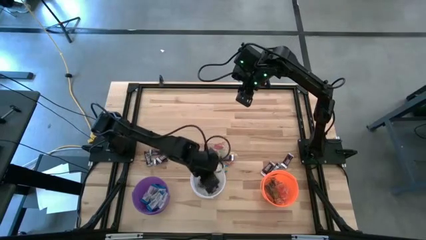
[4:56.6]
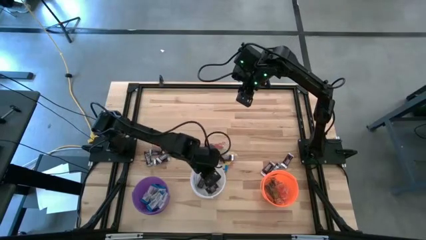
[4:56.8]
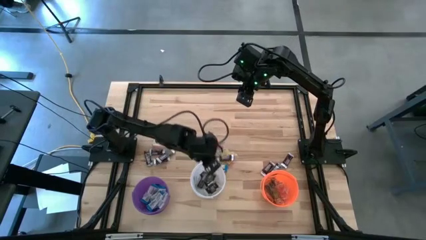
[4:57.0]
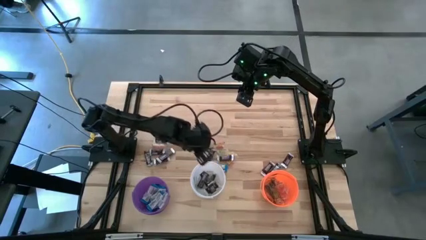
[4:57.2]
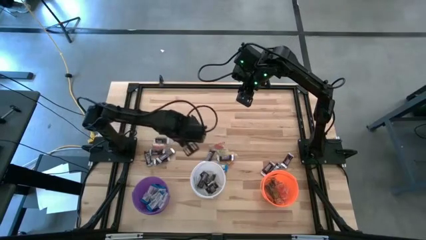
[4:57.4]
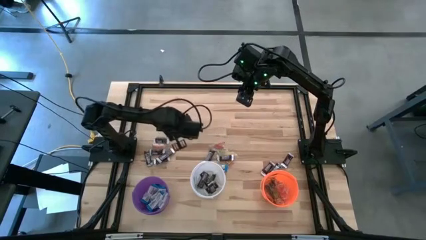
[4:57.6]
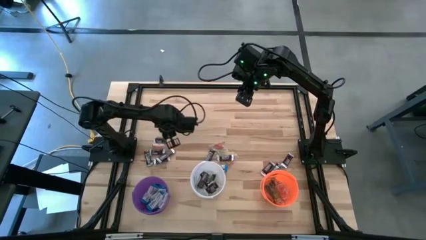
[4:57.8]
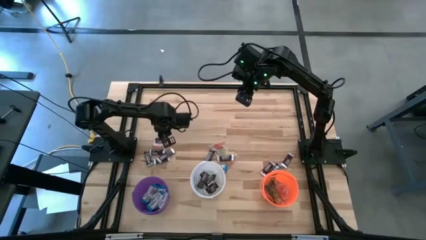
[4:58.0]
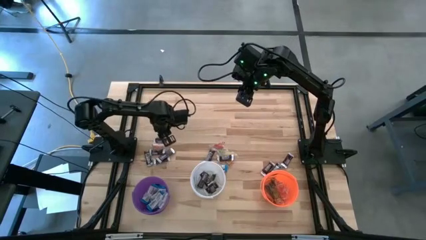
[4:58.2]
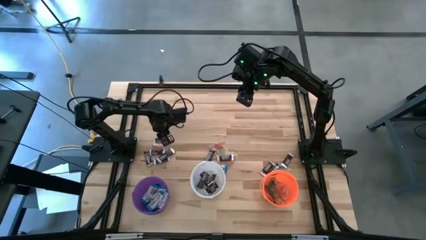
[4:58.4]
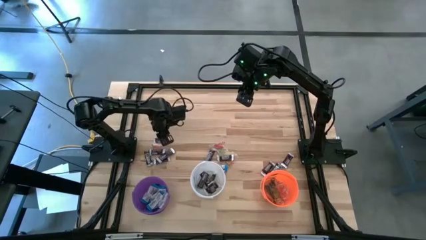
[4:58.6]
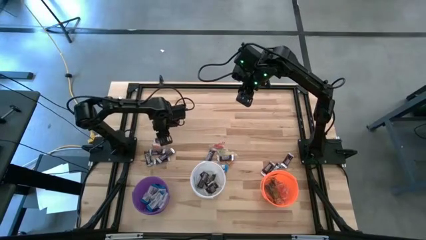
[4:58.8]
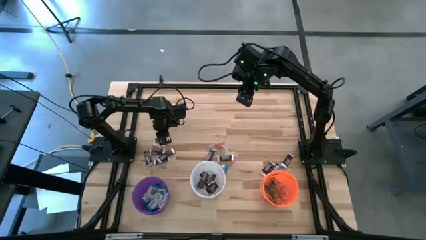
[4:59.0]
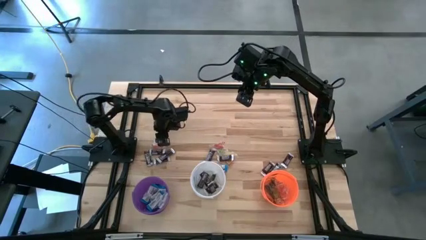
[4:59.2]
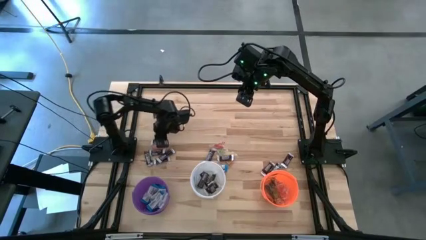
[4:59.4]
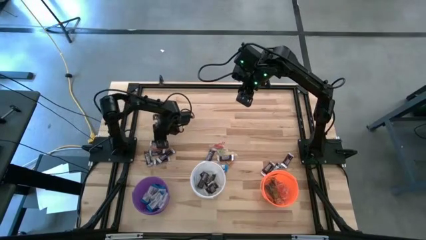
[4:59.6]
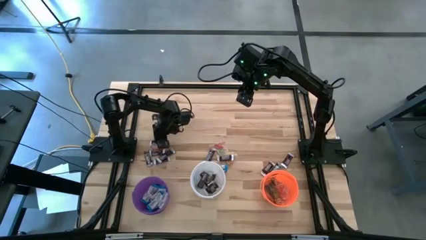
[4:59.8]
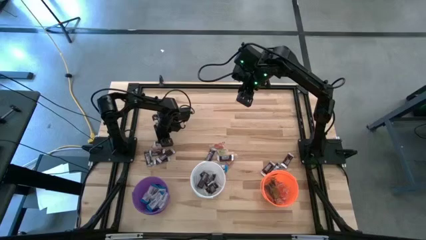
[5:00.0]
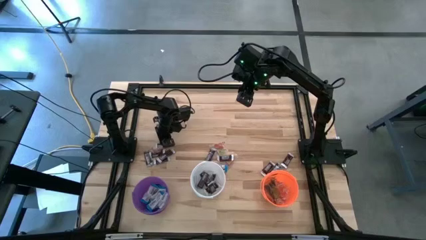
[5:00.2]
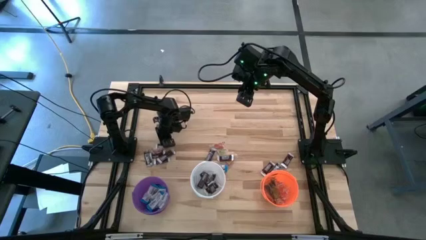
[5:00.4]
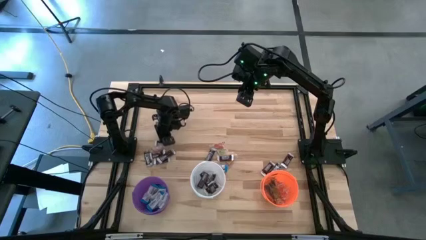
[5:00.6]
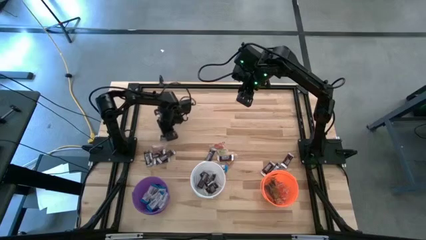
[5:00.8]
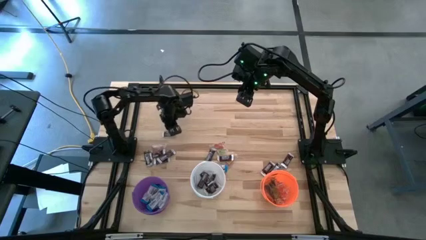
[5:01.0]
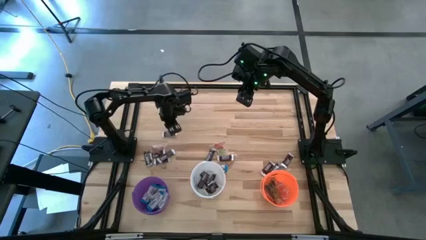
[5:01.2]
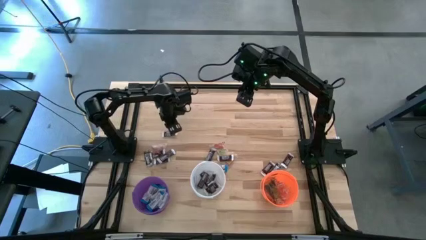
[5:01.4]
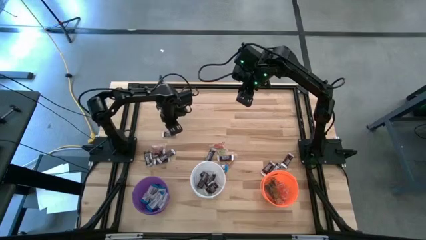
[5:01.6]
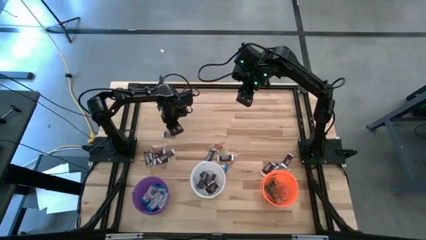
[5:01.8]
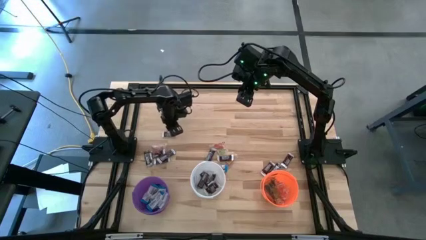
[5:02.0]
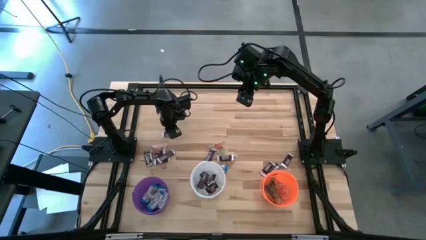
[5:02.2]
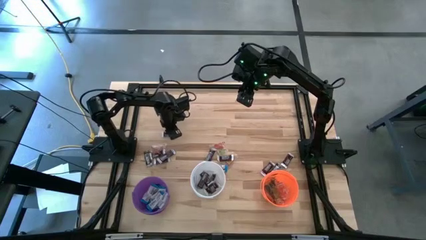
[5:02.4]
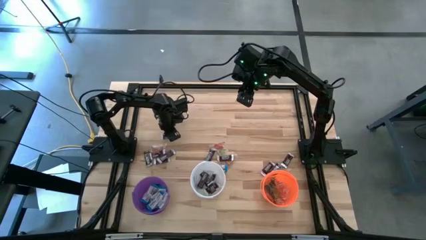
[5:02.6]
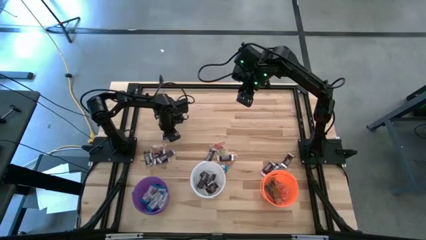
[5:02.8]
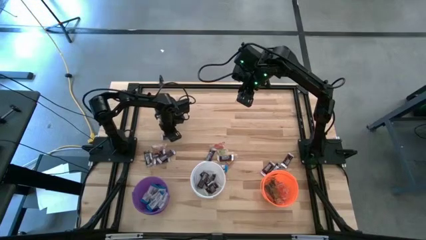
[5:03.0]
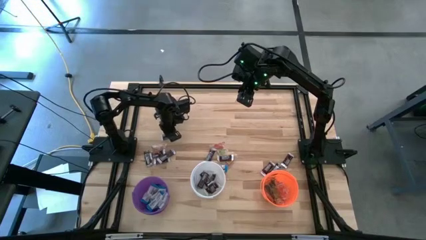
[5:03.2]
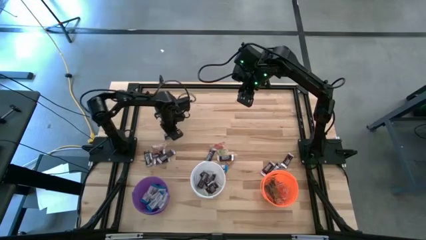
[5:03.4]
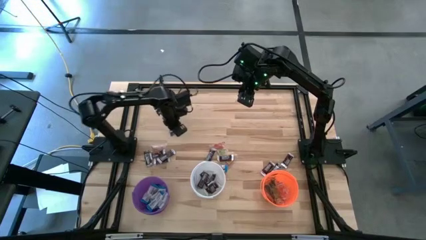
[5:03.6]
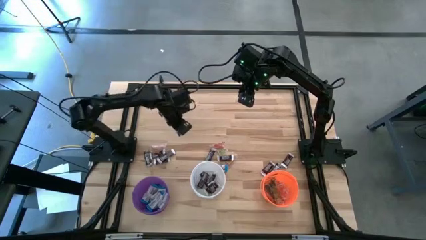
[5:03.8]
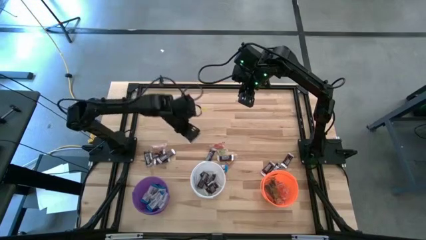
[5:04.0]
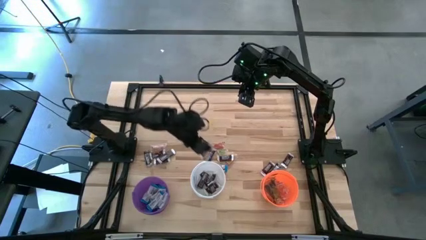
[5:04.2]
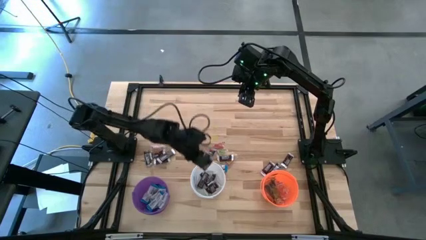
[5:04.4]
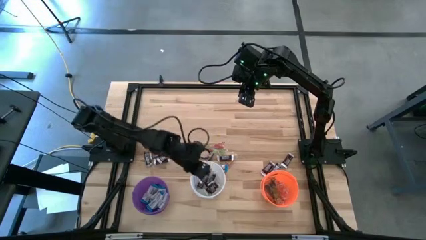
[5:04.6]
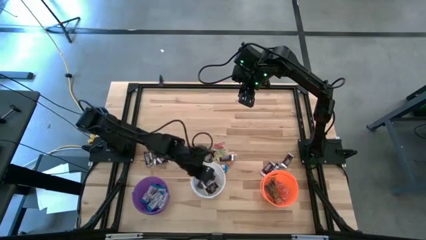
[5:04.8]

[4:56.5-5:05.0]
Task: Sort candy
Put the brown chocolate into the white bucket

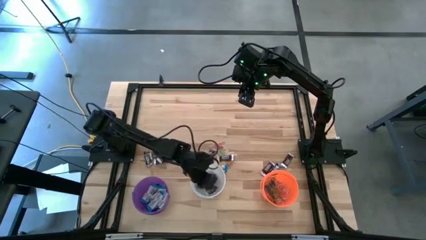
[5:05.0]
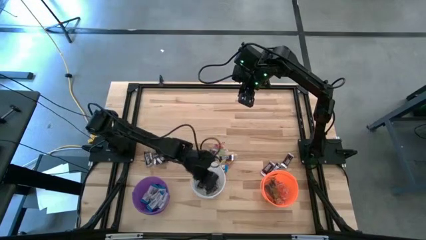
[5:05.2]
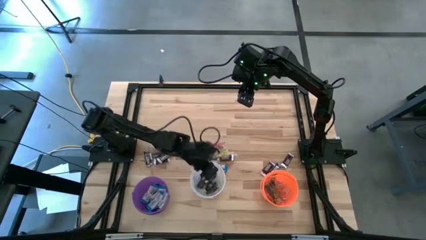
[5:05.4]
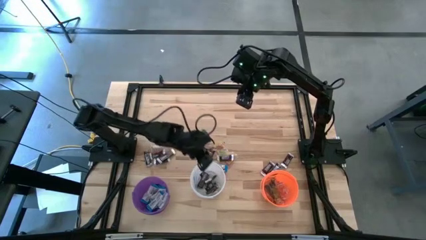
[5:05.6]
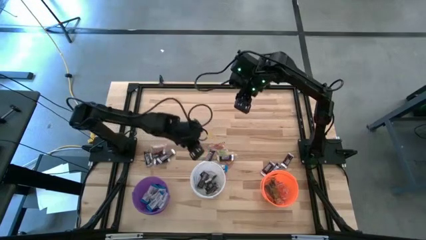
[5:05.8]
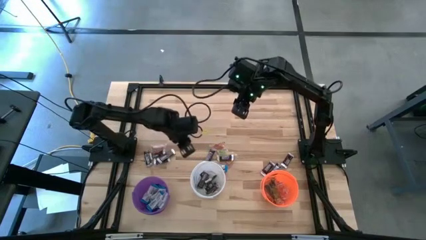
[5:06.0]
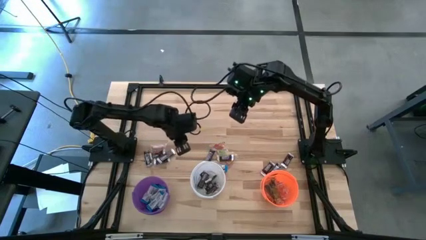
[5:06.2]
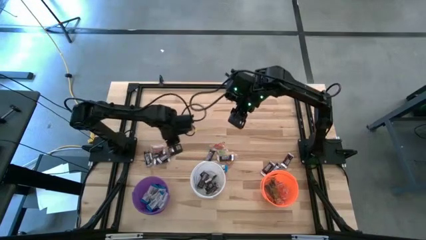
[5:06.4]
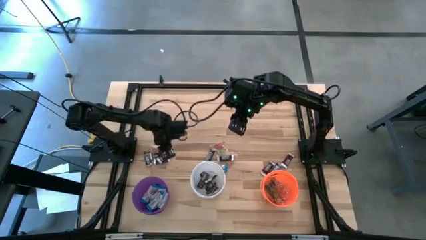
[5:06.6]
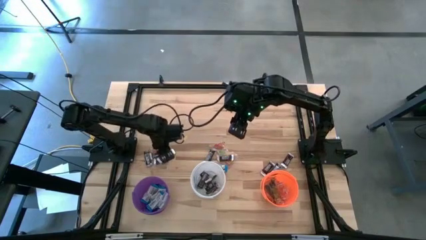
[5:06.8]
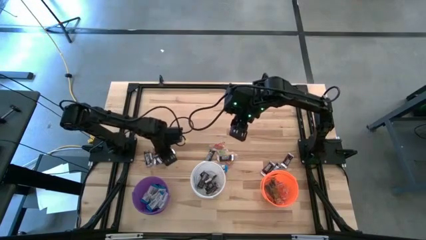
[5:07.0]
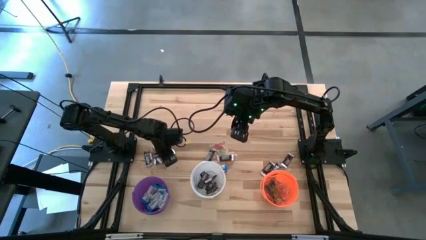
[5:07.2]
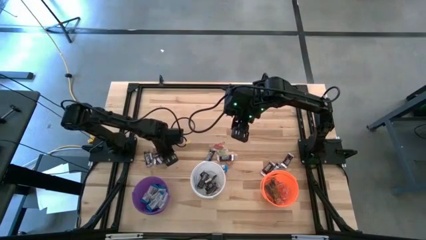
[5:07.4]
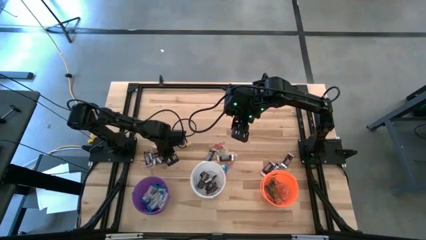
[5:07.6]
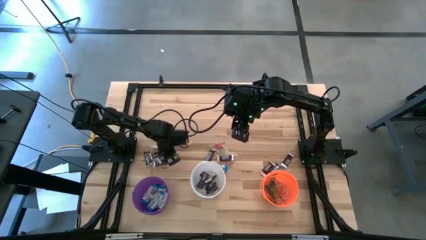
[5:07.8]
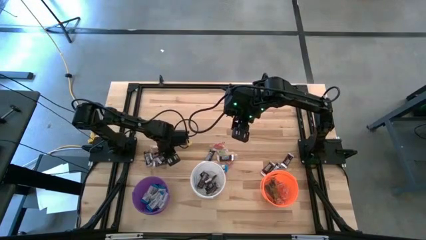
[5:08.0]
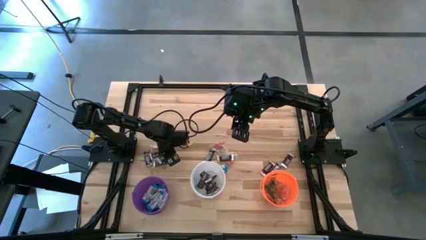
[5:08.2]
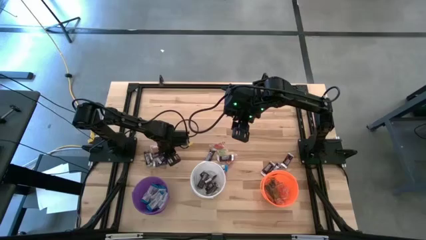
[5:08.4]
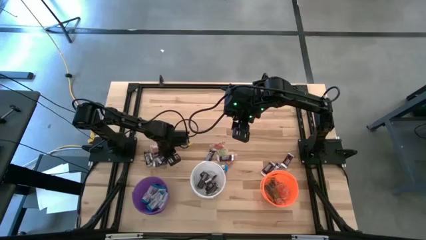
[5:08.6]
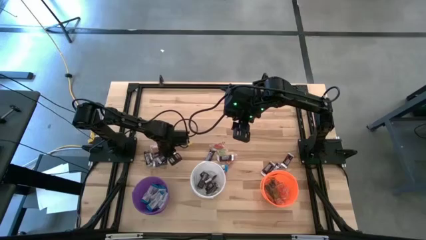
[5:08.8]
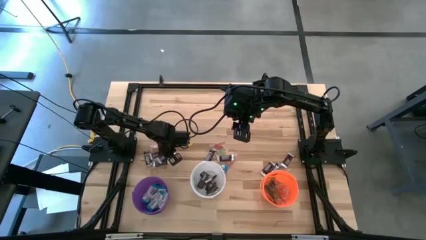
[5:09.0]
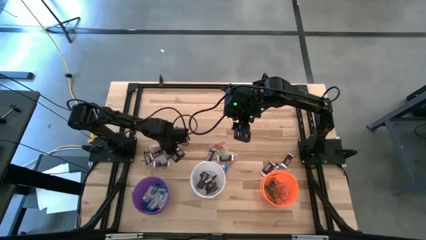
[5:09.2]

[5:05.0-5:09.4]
Put the brown chocolate into the white bucket

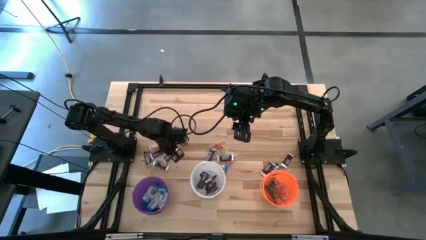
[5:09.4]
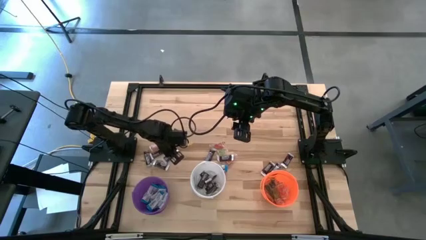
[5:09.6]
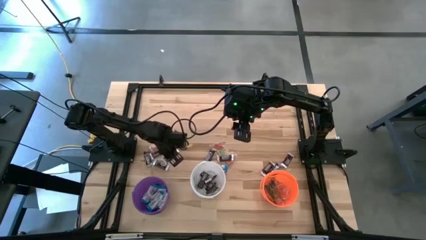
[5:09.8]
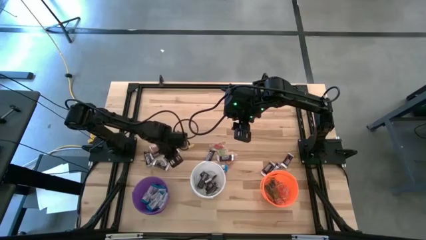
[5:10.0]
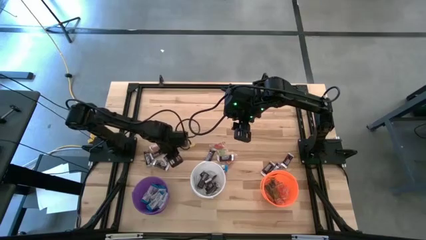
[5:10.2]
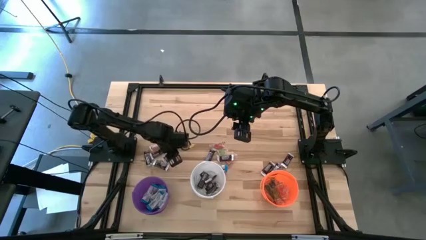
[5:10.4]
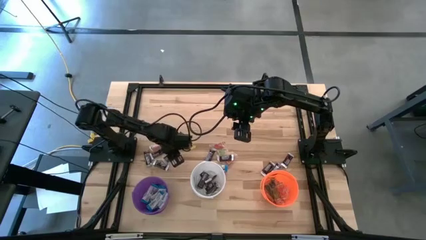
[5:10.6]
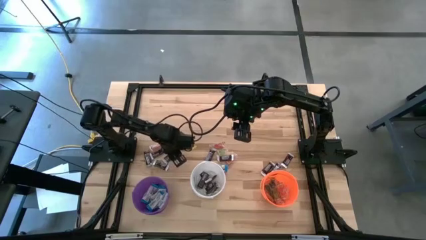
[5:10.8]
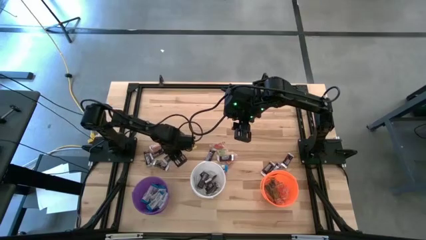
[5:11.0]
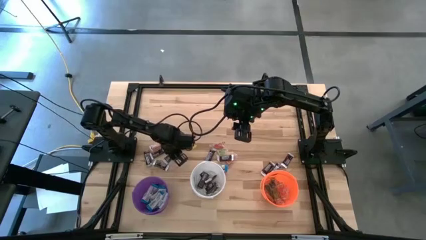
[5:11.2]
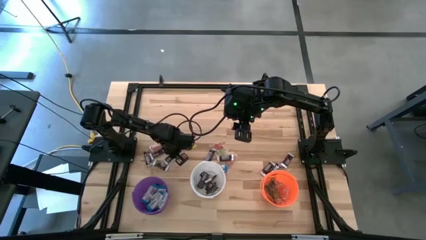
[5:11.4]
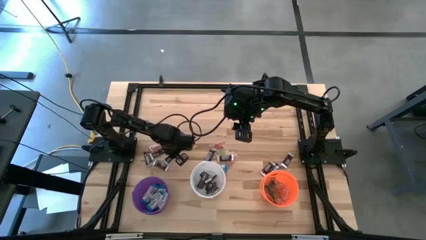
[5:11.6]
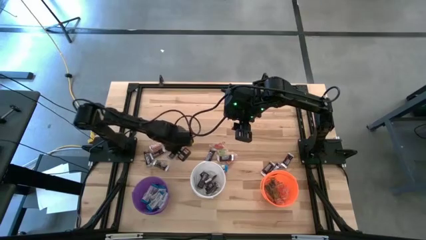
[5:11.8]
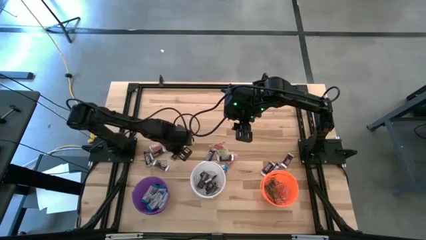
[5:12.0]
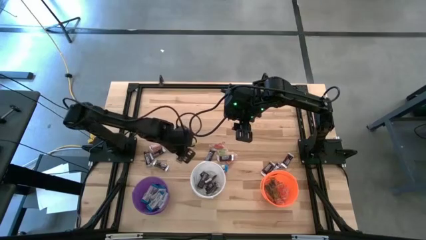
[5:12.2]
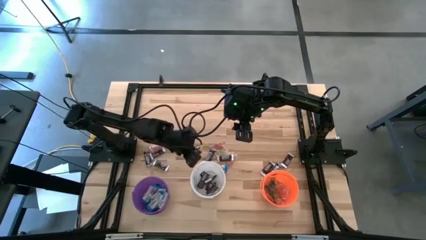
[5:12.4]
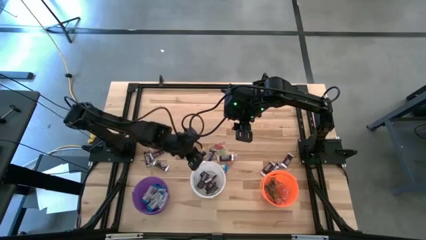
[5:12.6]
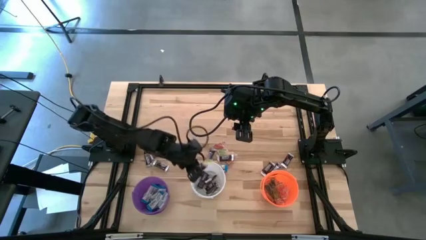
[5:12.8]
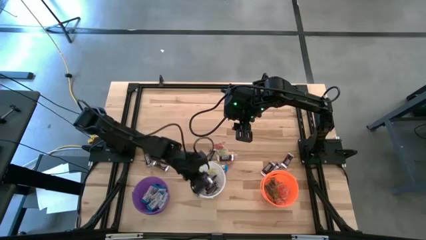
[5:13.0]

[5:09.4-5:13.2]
Put the brown chocolate into the white bucket
